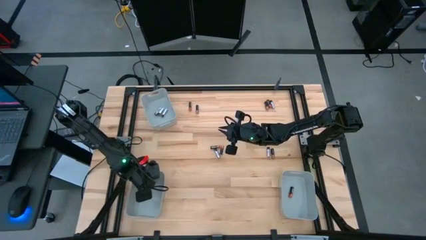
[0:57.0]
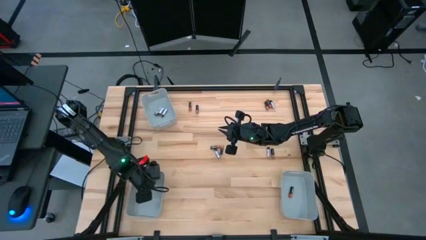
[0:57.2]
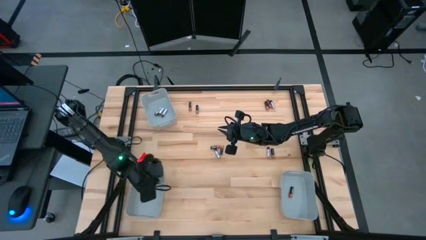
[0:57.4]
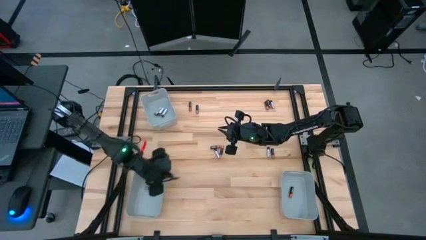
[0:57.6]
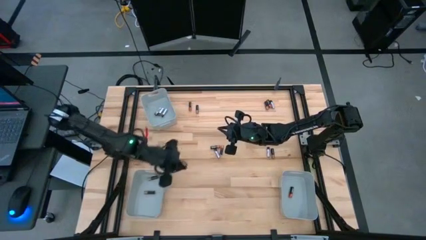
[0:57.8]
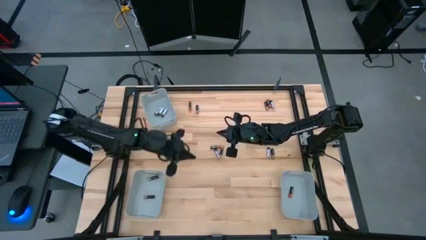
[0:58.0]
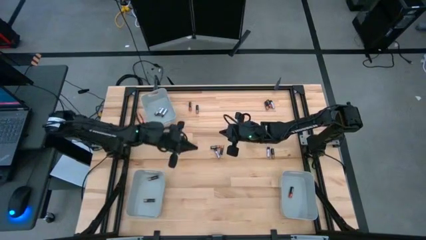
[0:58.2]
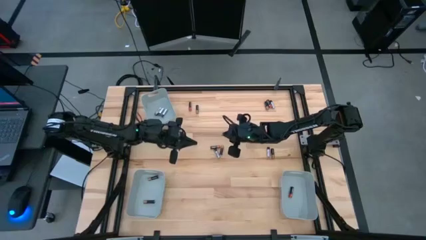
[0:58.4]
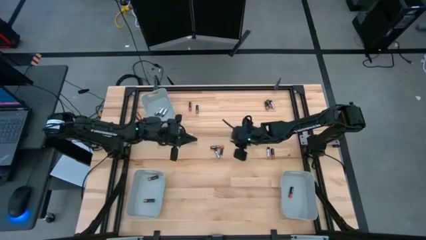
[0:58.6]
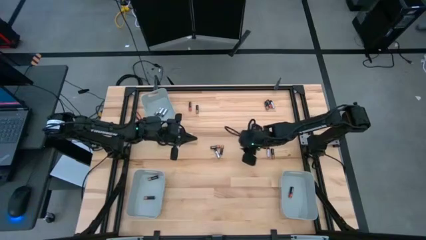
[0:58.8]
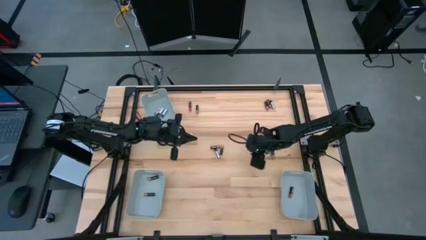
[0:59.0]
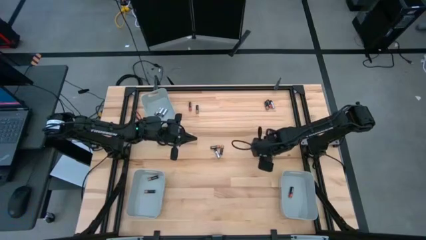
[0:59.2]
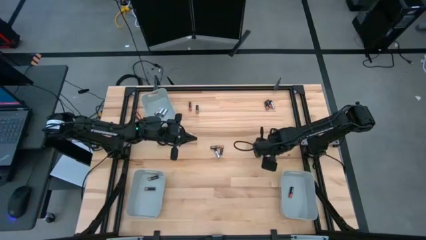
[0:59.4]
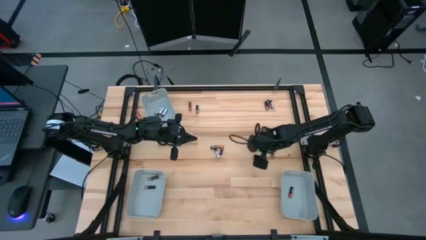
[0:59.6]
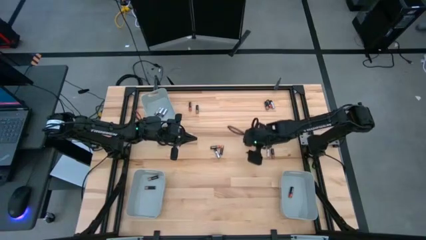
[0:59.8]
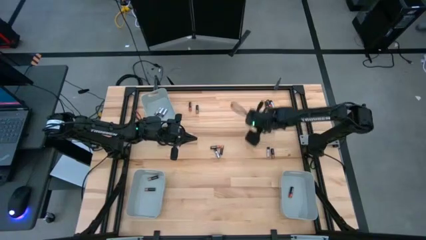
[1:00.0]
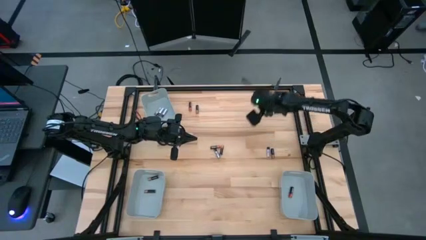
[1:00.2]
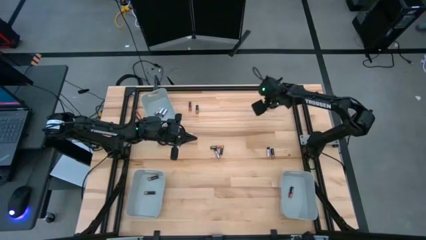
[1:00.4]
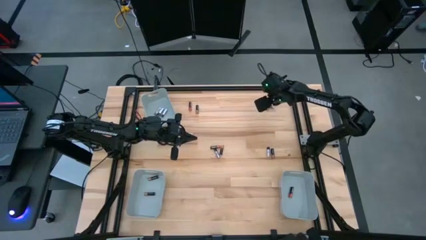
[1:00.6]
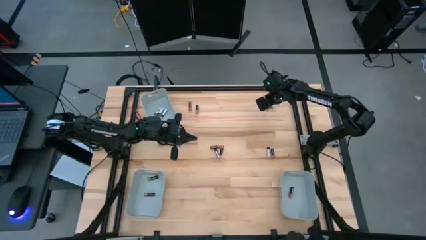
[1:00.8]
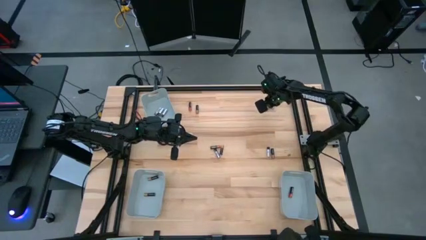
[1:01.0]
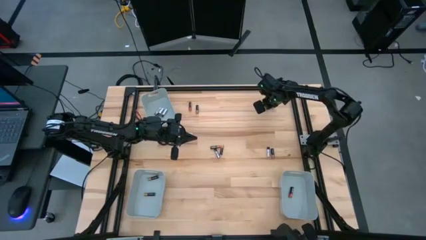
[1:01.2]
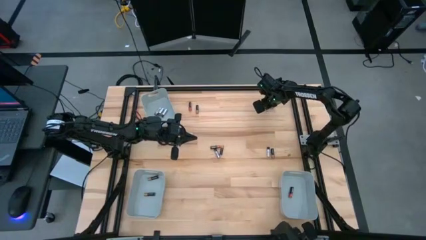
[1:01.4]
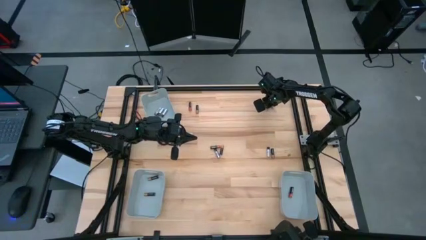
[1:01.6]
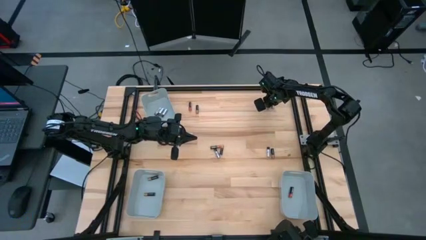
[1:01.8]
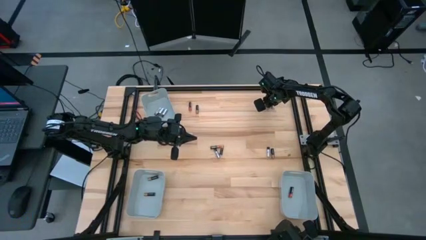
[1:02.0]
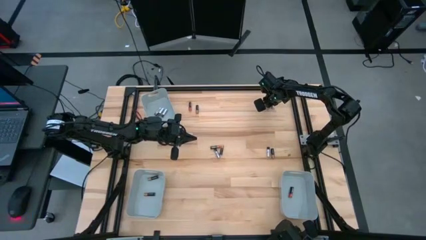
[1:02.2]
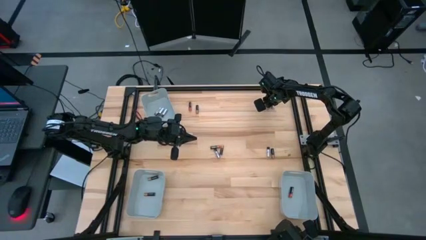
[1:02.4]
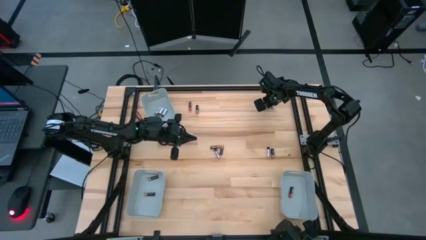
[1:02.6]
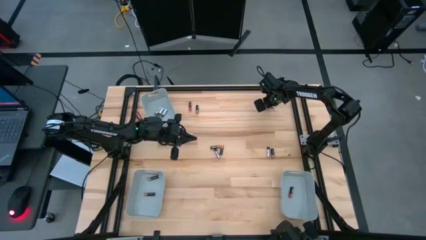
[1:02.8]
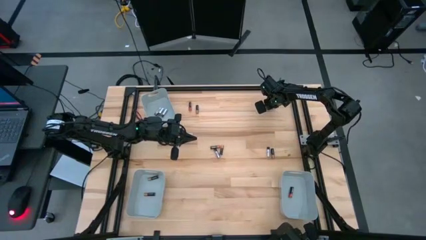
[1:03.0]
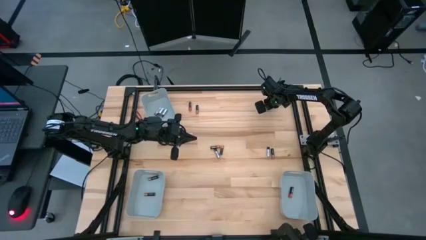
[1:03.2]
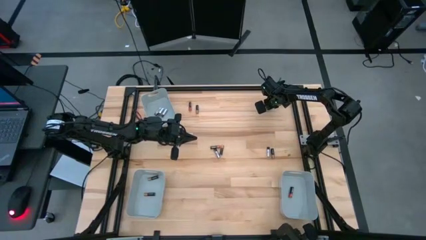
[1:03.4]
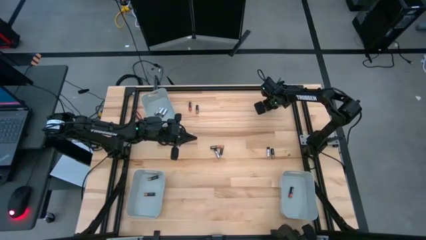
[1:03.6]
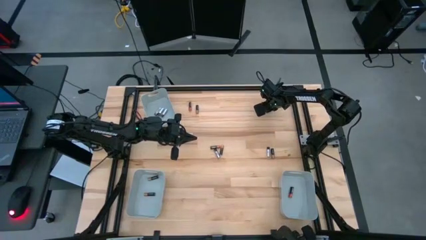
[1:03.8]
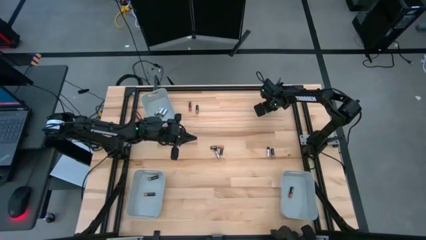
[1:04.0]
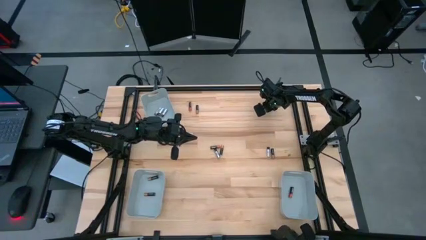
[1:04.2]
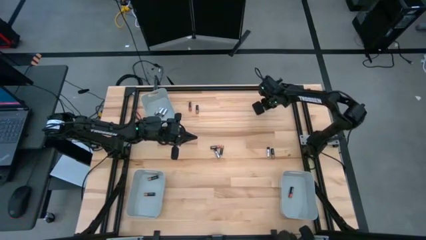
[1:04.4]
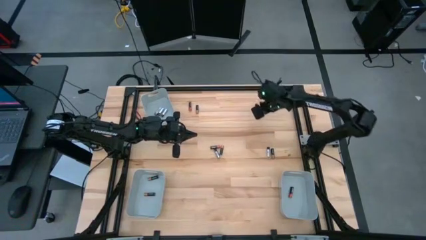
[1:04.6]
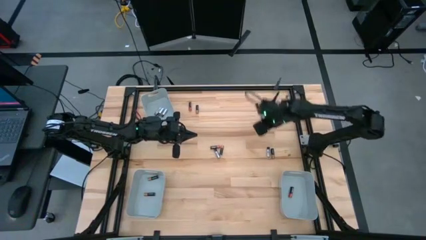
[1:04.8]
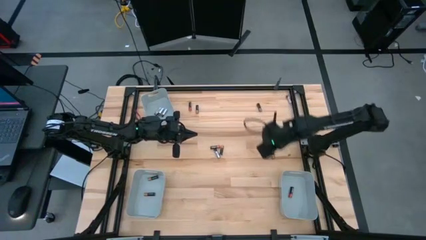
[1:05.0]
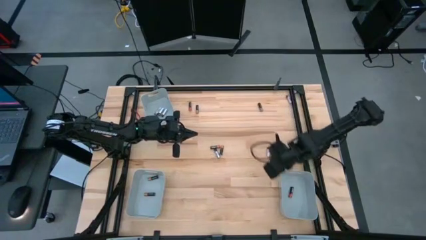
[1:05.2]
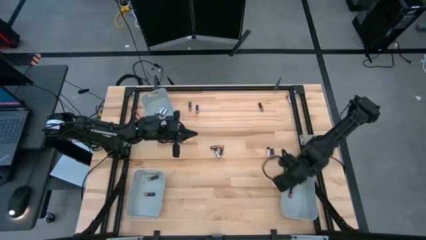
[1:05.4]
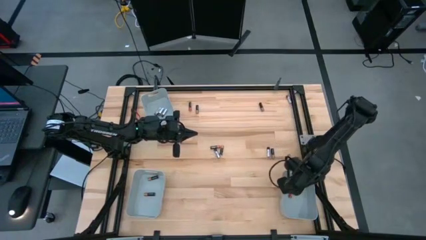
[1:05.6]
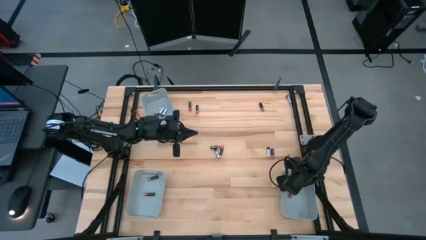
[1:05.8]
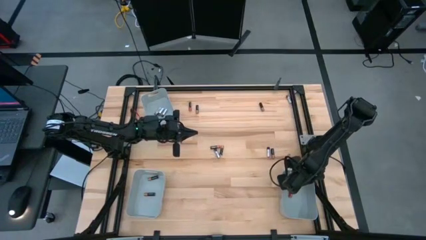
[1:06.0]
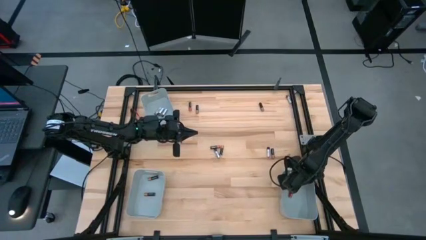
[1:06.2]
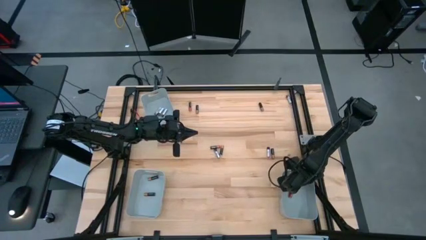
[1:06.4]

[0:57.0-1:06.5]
Task: Sort batteries
Put the black-red battery into the bottom right gray bin

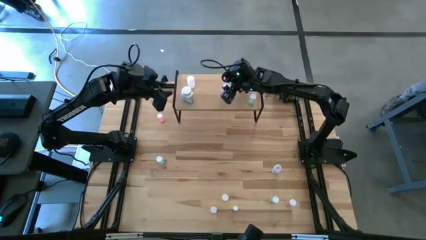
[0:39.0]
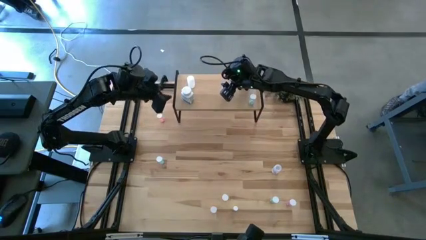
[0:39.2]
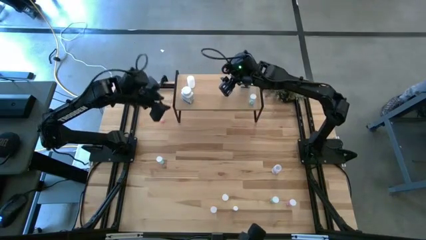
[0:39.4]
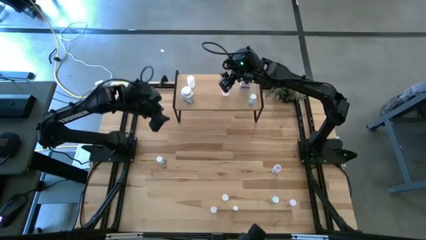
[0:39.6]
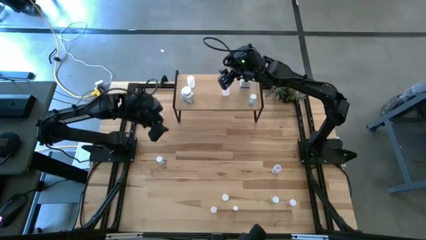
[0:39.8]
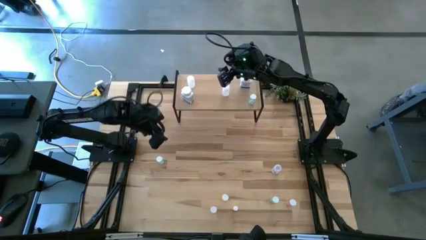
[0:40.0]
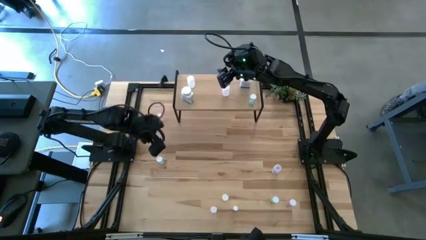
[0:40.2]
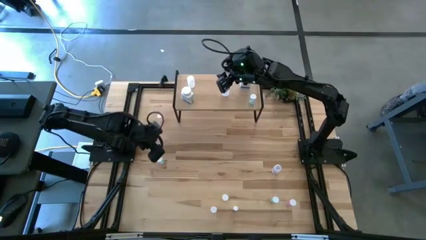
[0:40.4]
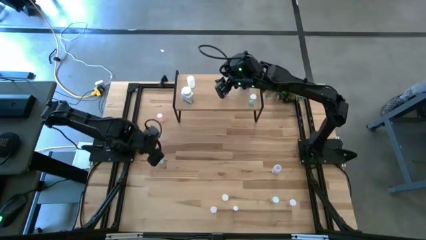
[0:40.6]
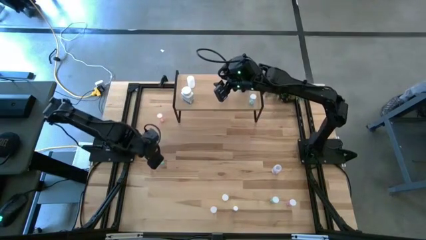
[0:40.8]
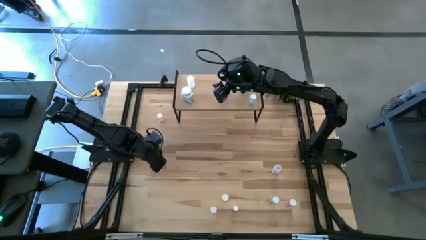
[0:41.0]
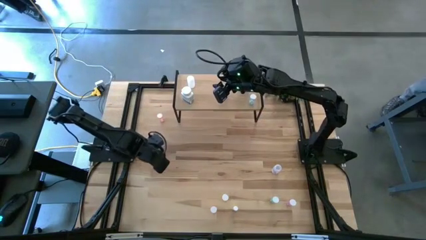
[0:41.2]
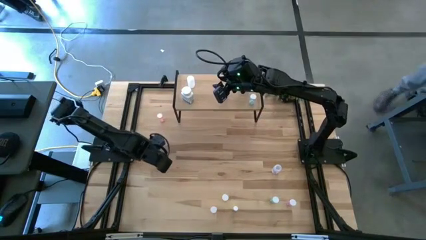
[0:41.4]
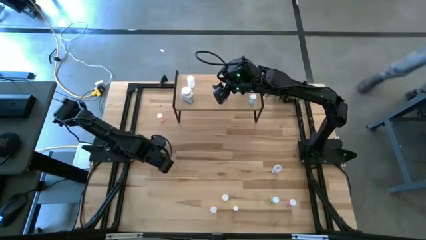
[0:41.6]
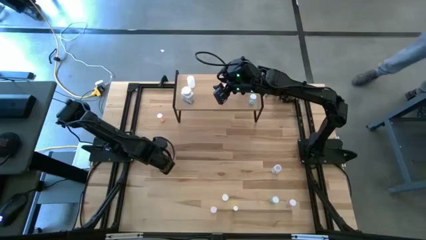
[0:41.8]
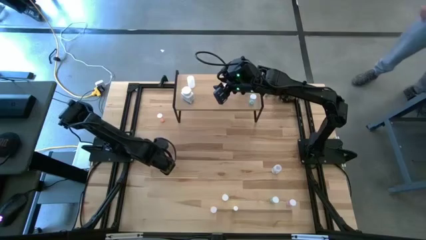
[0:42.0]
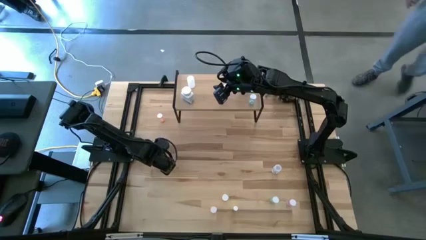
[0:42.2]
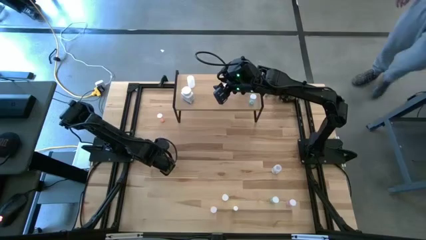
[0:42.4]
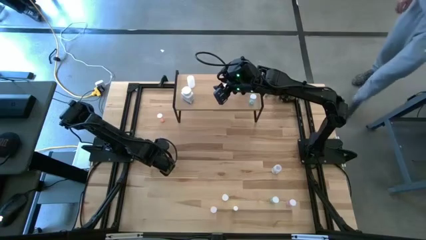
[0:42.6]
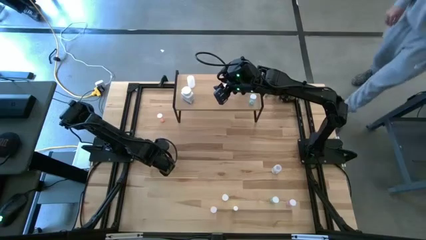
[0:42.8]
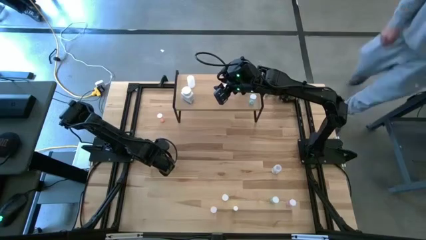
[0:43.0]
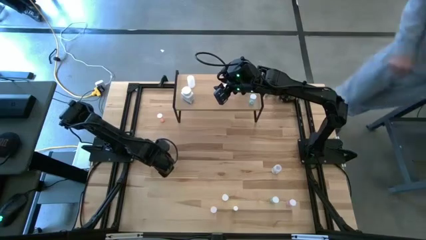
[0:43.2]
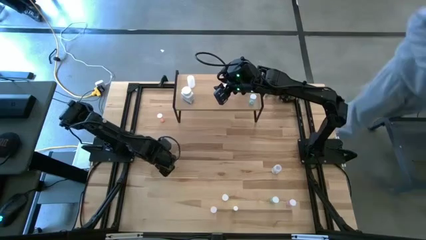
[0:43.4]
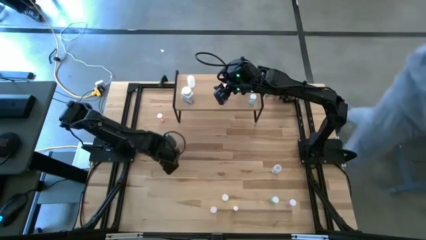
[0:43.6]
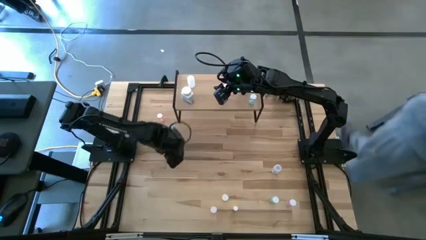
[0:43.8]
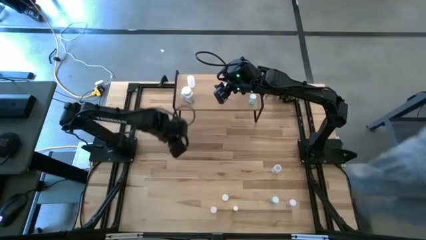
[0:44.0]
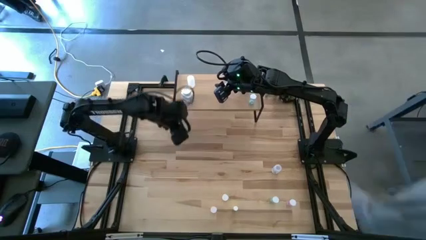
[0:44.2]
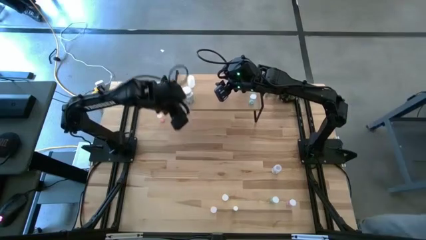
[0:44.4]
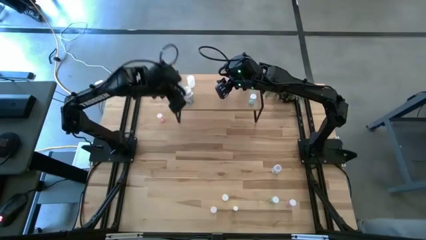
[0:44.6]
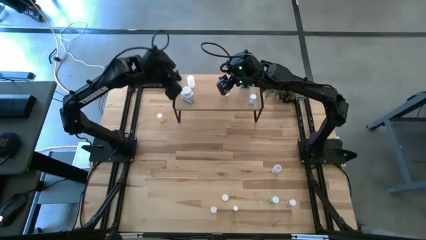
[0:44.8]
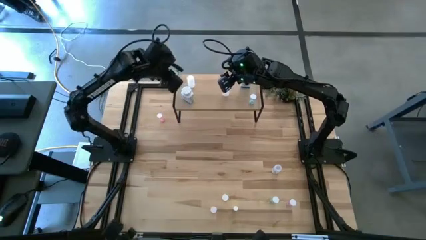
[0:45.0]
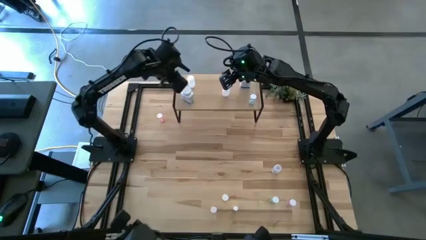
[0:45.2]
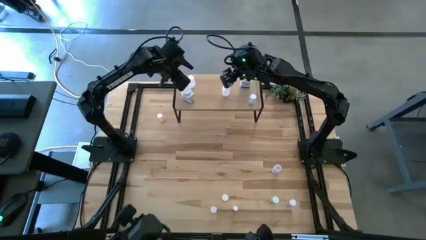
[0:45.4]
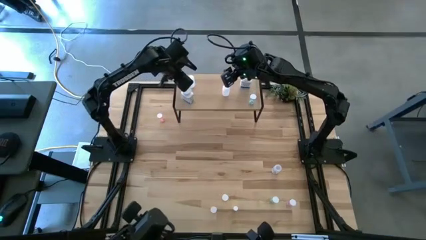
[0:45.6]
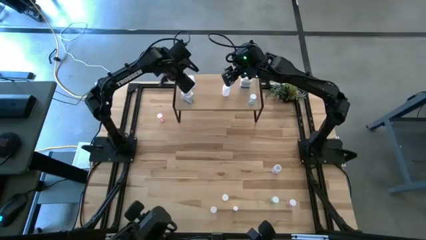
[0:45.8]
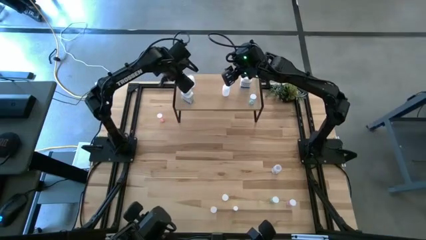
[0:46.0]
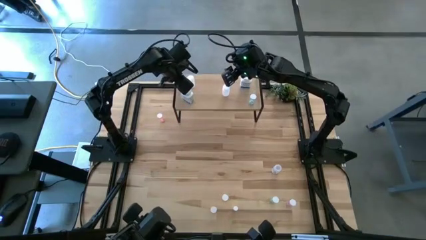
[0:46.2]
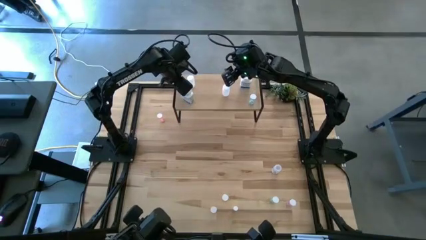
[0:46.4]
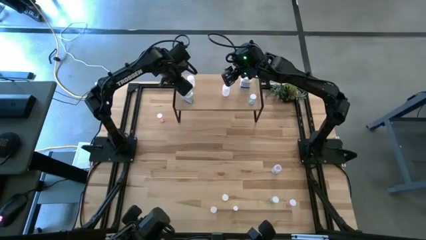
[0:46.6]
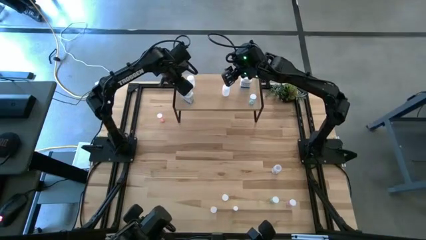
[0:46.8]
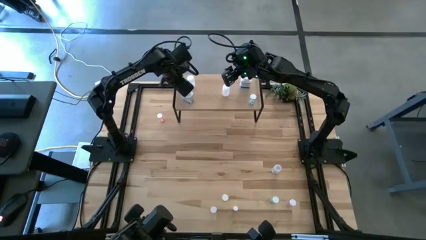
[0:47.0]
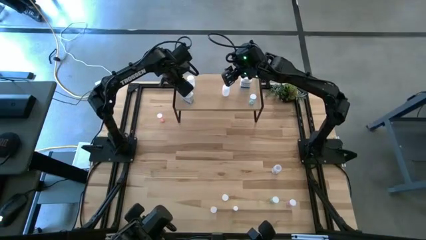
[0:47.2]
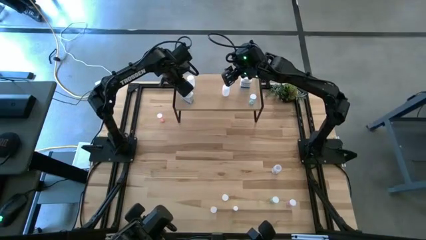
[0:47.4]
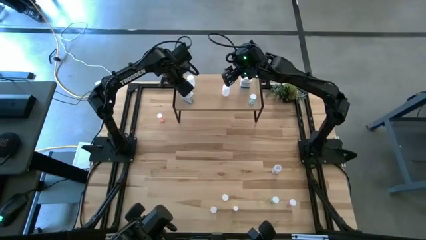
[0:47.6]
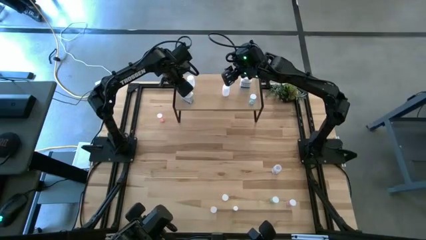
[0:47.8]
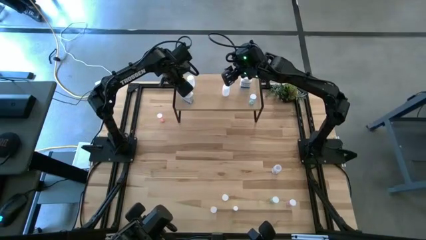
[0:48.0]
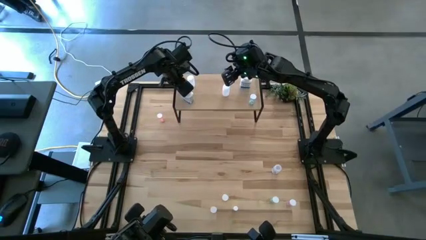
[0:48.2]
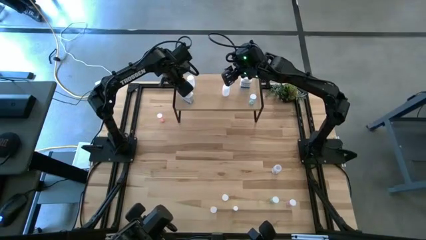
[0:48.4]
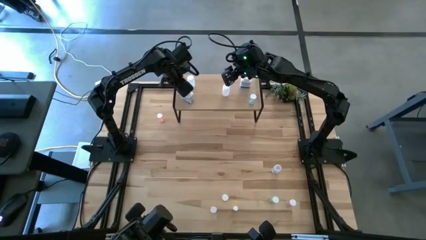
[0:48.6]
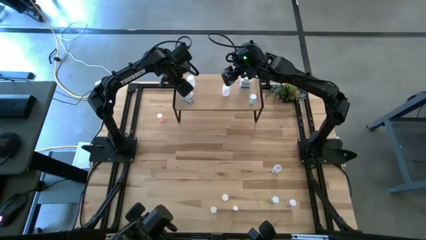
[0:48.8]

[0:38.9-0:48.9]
Task: Pick and place medicine bottles onto shelf by color
Put the left green transparent pill bottle on the shelf
